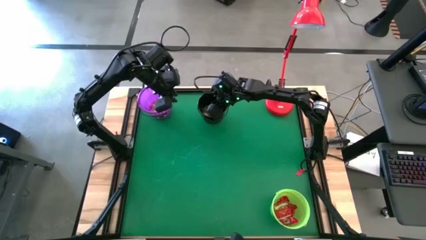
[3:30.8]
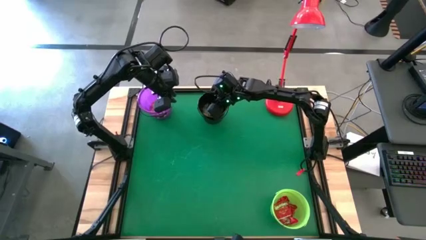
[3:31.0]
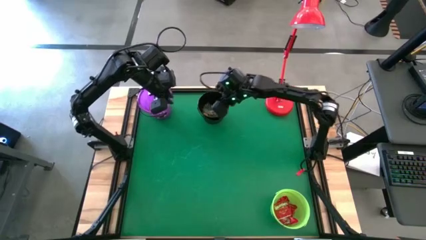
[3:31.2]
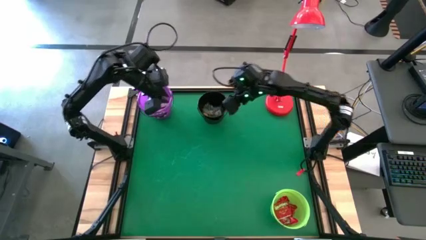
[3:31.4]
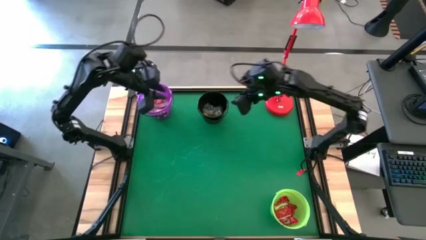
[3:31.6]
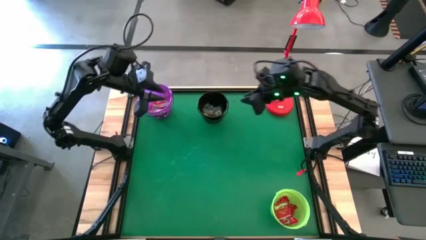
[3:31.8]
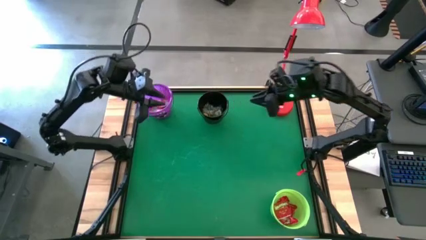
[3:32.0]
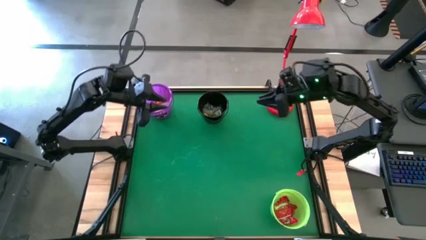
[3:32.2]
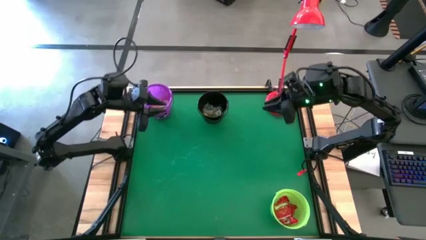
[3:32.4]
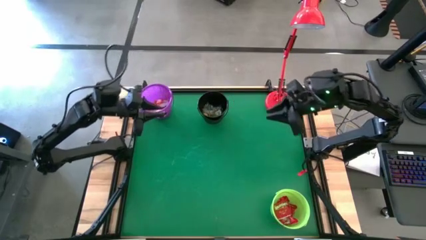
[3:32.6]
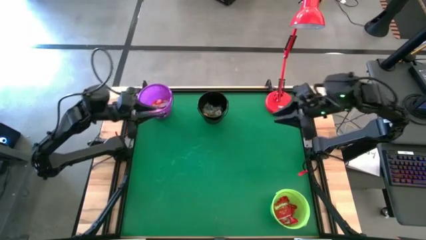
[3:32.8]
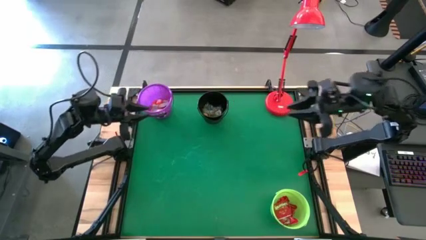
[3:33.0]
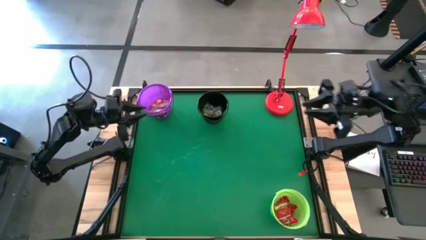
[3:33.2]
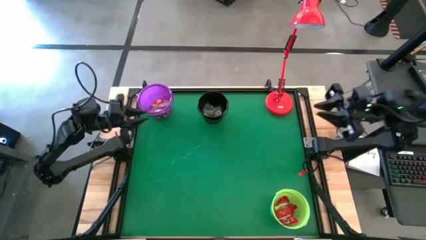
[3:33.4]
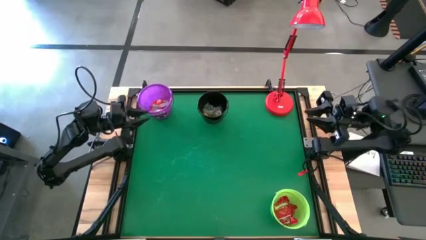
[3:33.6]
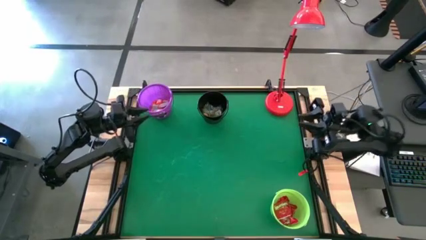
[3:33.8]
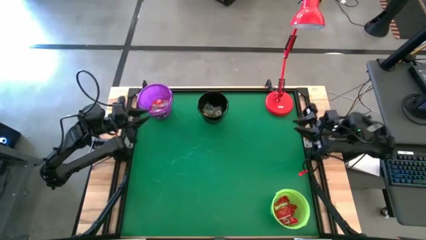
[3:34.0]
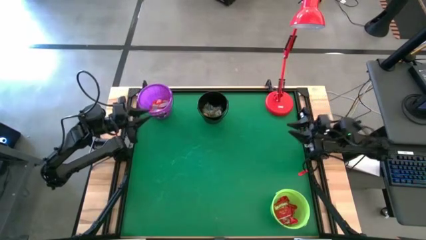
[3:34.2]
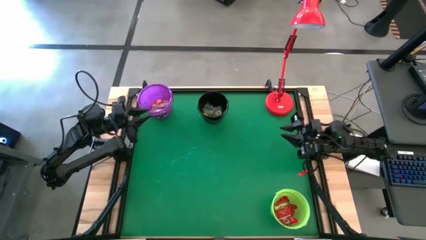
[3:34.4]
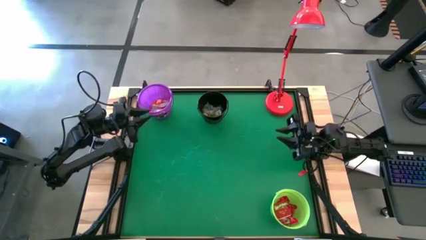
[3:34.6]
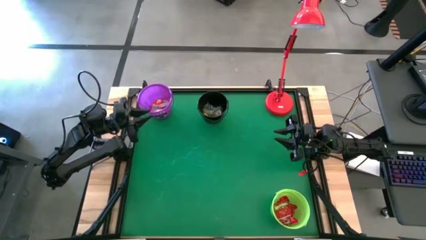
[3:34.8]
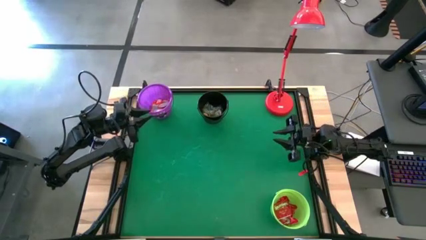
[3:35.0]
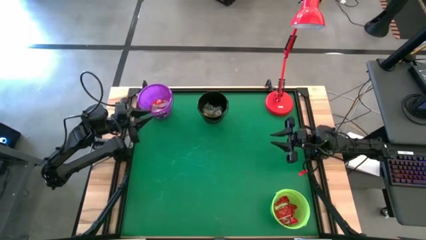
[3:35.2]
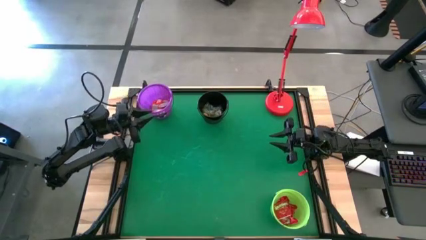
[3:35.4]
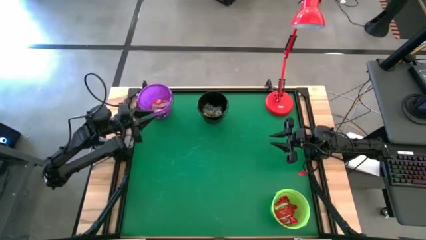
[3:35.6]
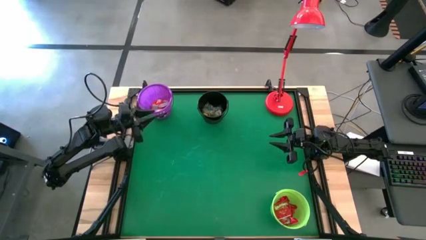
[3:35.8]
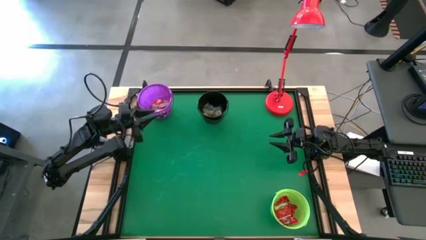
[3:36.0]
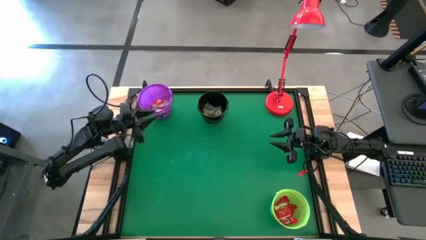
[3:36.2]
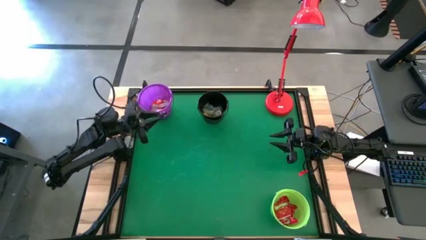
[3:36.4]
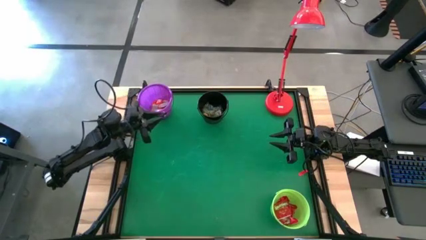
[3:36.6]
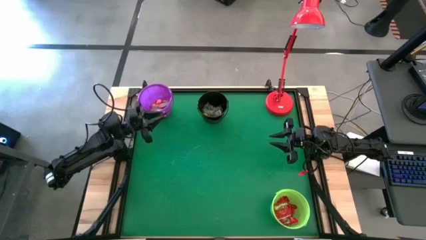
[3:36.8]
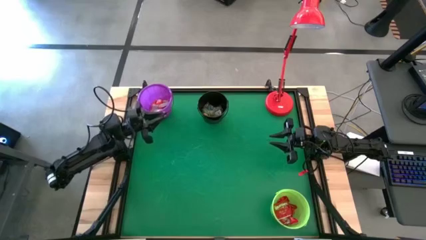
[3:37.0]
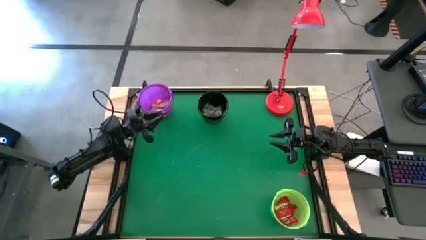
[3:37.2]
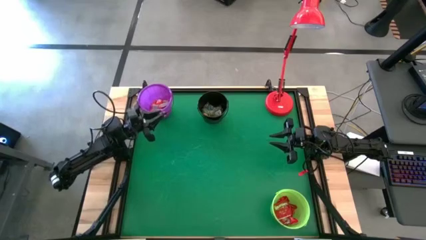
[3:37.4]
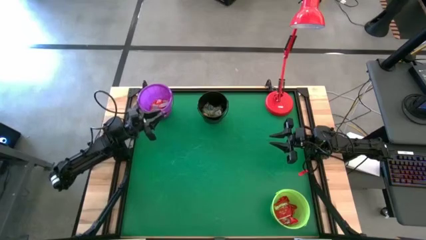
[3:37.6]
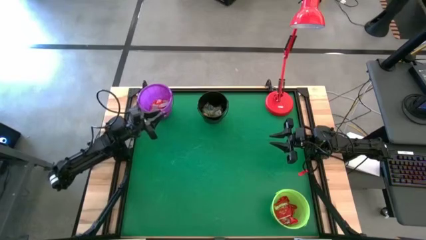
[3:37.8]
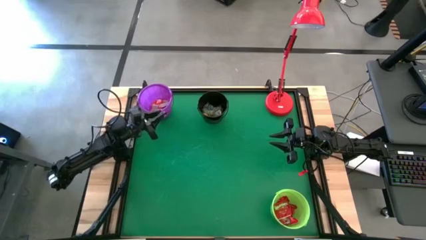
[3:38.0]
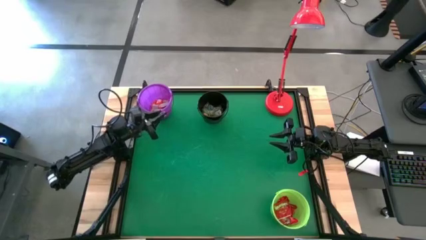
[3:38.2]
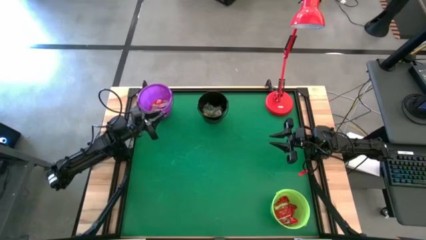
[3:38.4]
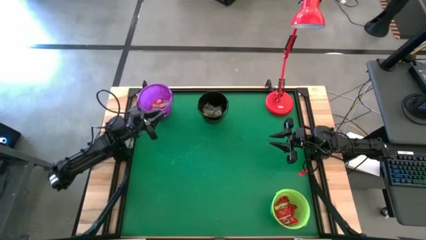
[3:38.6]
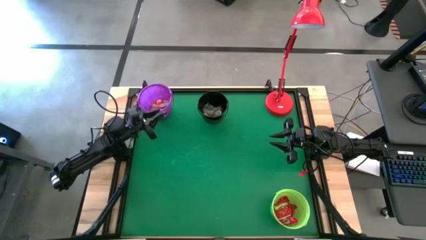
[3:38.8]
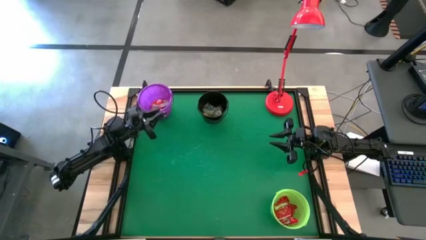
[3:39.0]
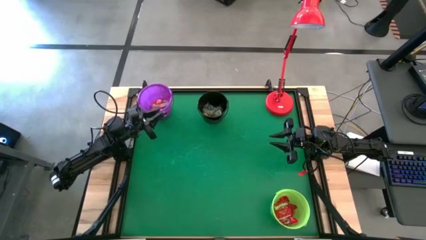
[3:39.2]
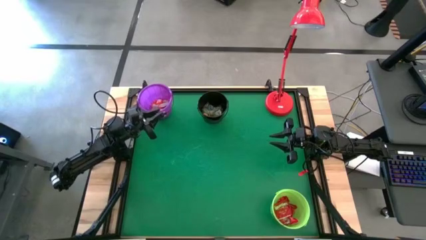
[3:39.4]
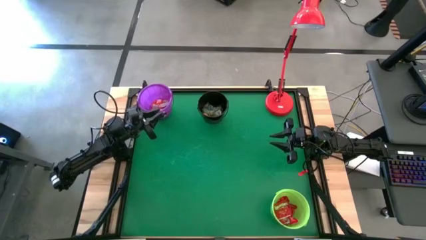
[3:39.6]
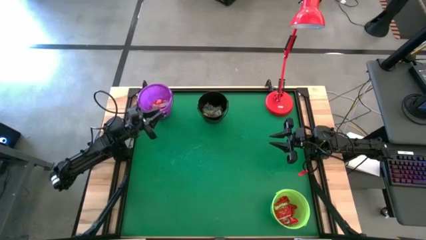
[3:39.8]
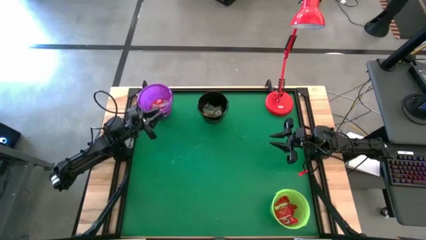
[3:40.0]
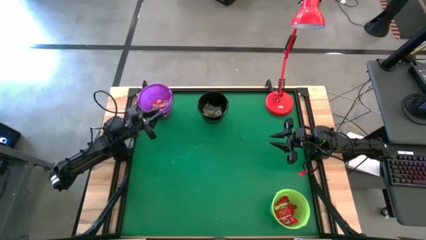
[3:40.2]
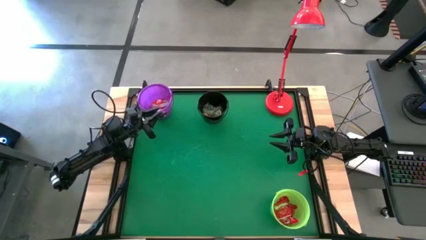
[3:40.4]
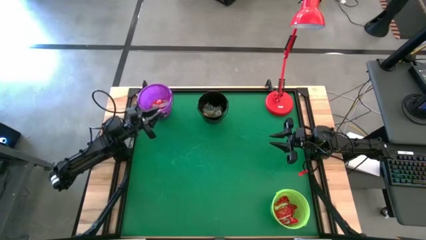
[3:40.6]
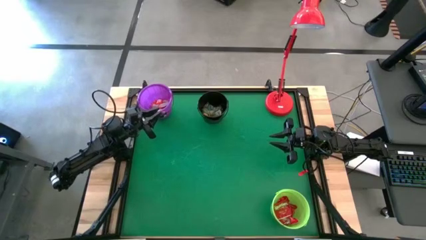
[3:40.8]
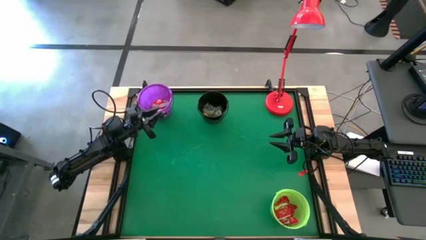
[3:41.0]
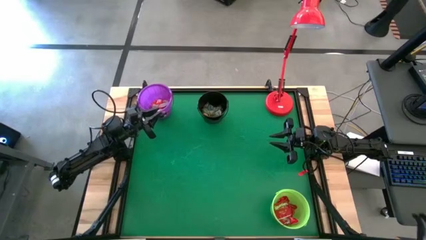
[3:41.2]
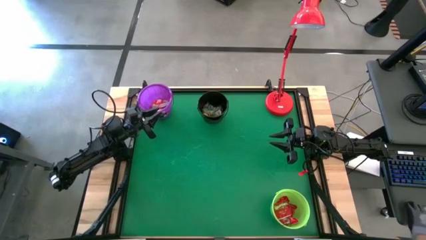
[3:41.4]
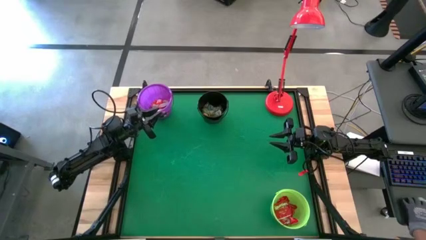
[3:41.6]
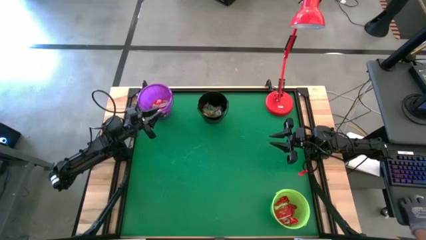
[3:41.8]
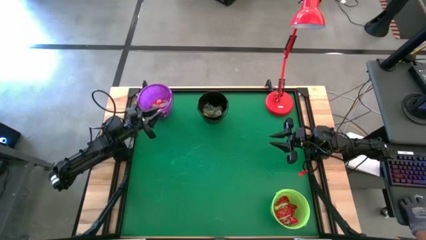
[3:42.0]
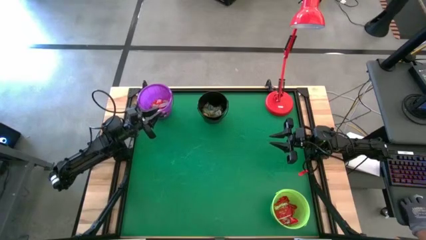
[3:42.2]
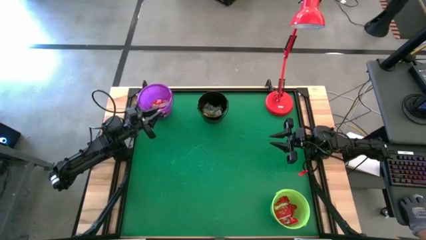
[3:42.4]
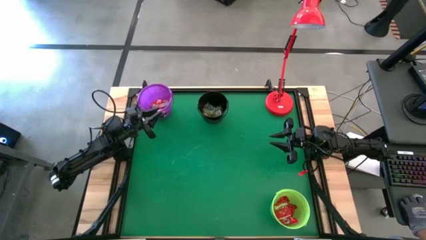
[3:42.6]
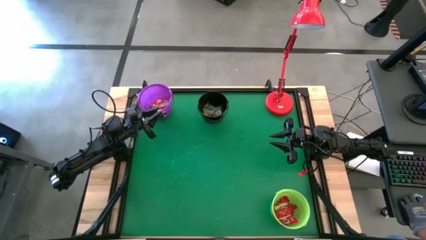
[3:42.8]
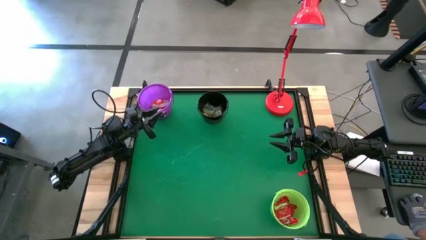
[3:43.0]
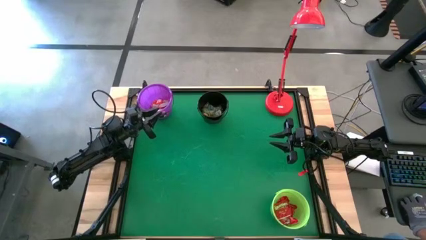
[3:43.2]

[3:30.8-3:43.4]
Task: Sort candy
Return to Home Position
